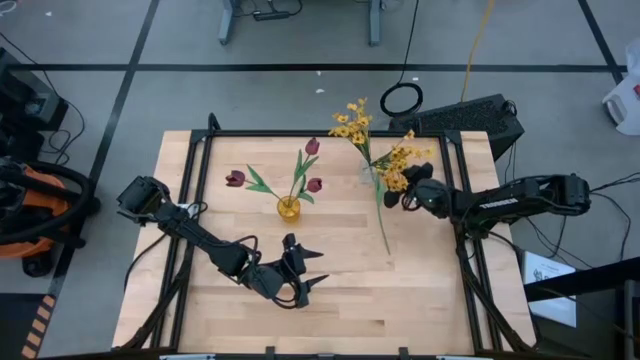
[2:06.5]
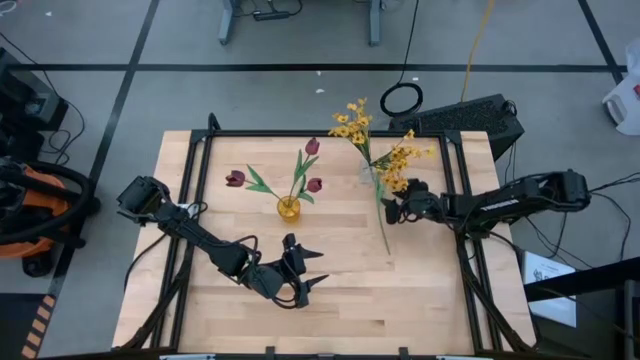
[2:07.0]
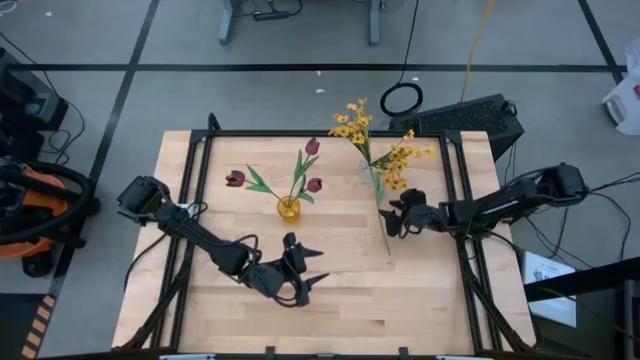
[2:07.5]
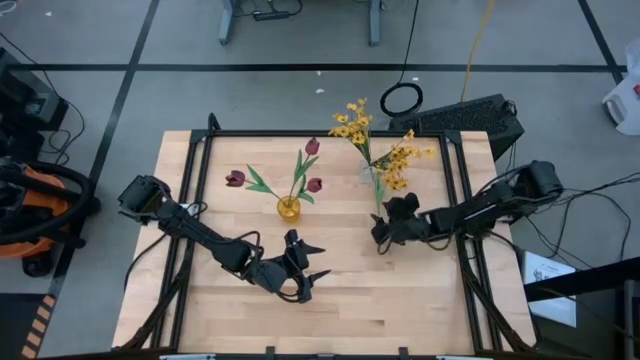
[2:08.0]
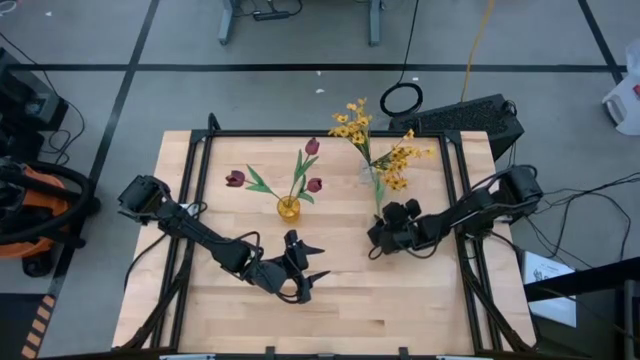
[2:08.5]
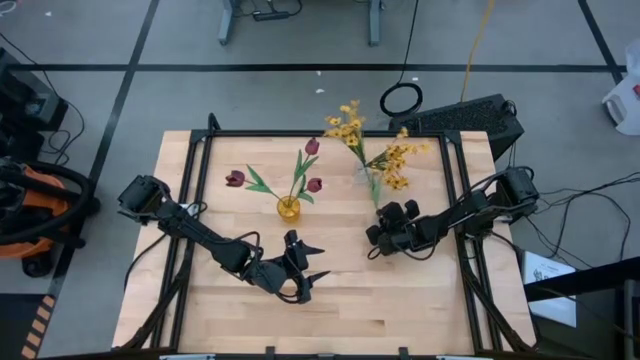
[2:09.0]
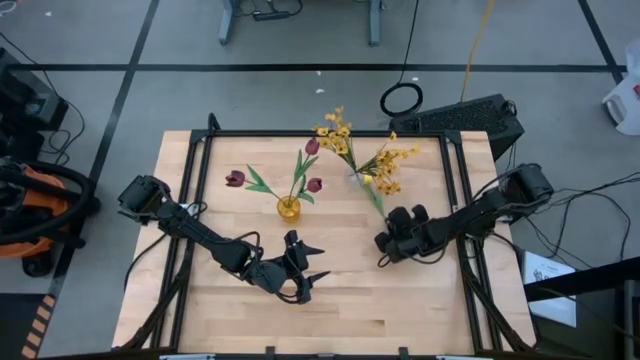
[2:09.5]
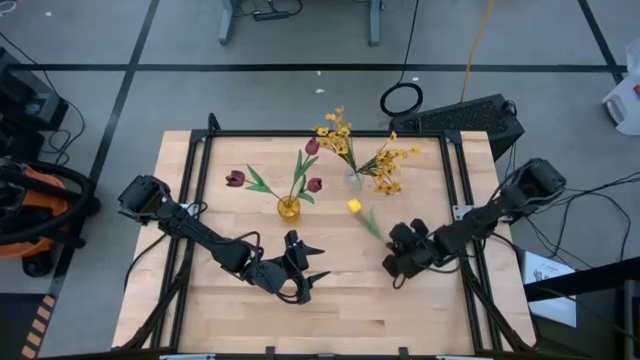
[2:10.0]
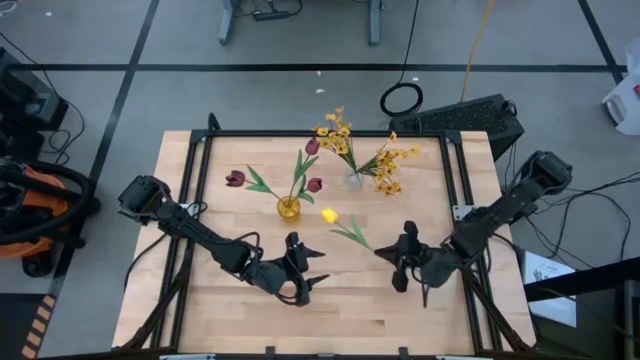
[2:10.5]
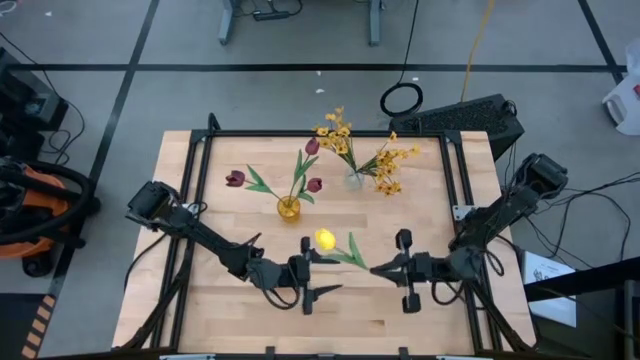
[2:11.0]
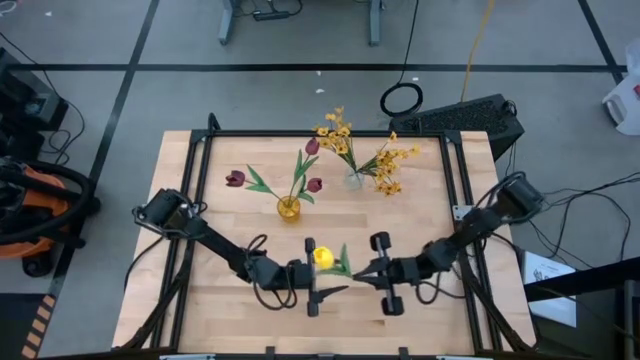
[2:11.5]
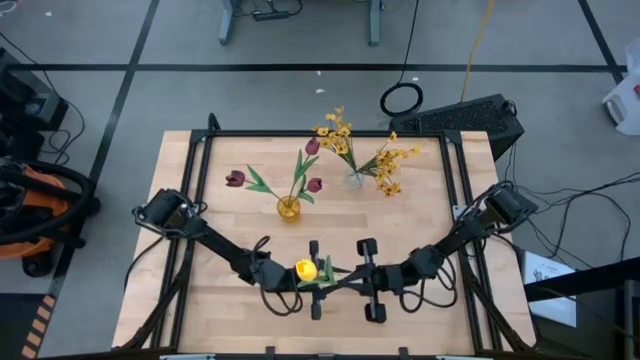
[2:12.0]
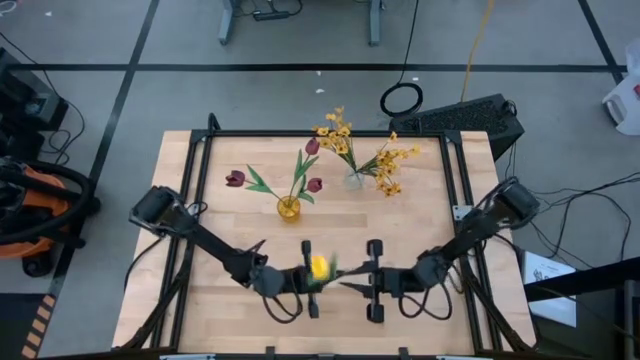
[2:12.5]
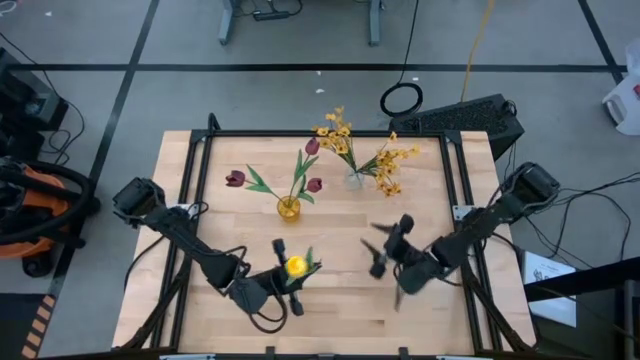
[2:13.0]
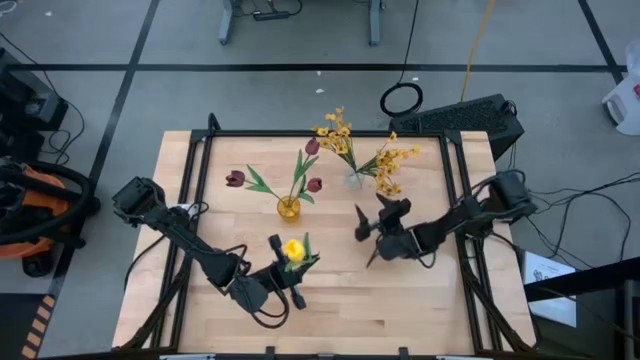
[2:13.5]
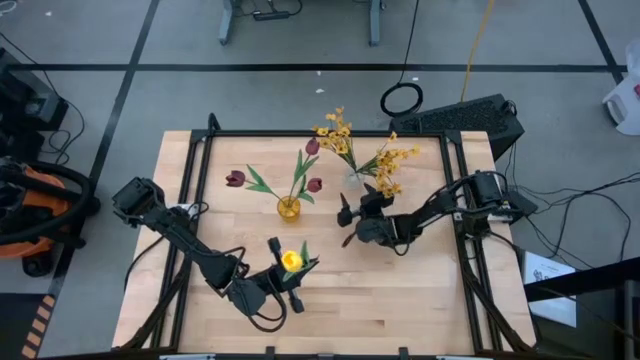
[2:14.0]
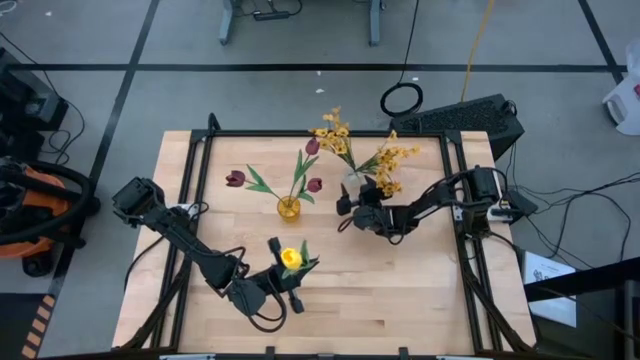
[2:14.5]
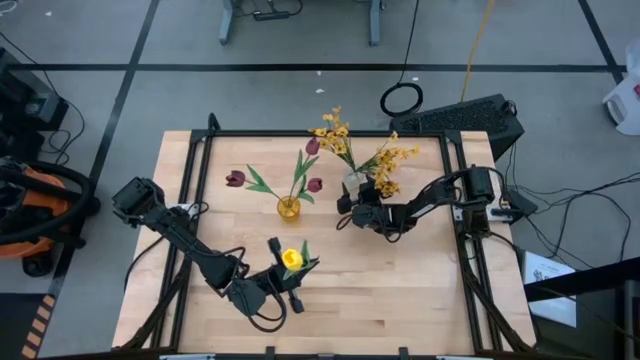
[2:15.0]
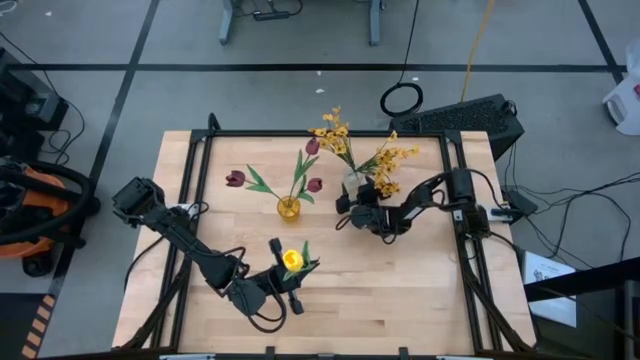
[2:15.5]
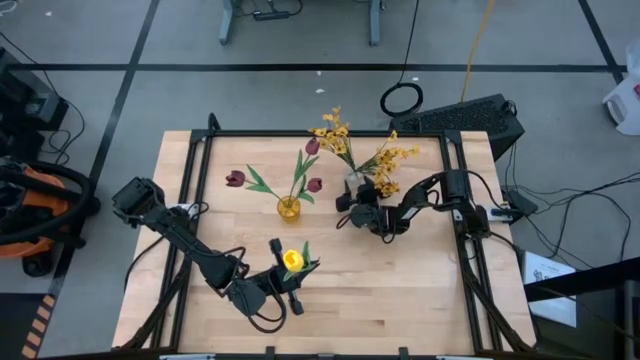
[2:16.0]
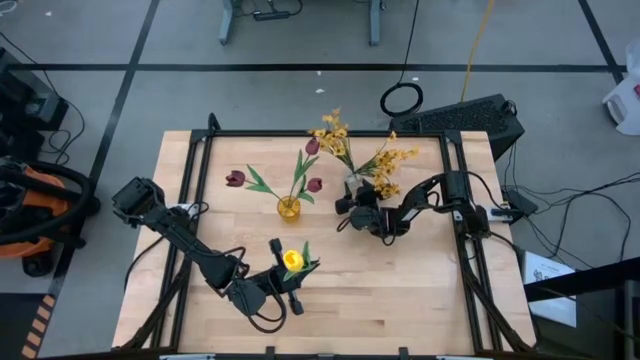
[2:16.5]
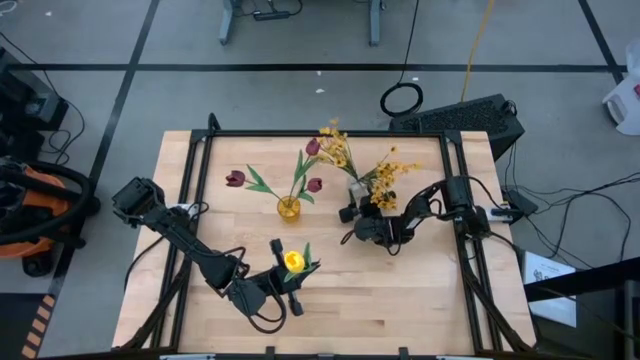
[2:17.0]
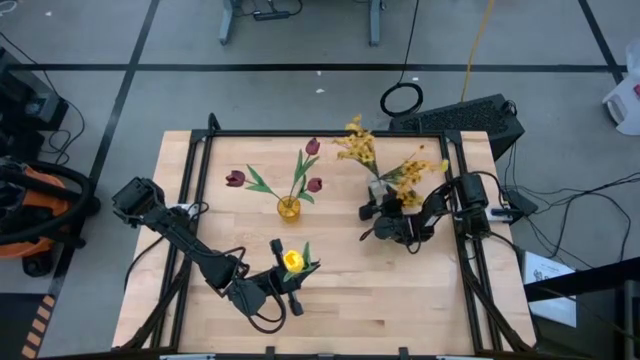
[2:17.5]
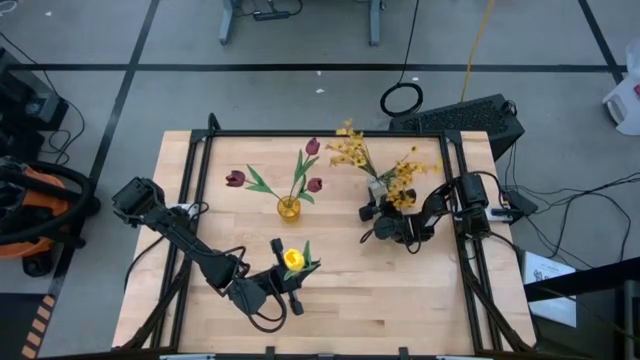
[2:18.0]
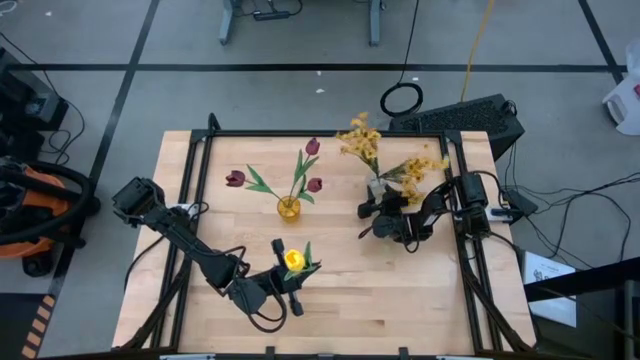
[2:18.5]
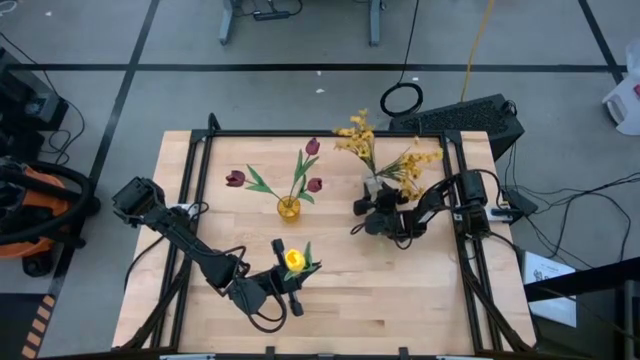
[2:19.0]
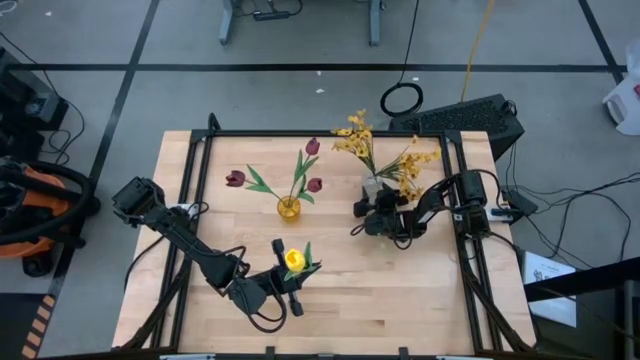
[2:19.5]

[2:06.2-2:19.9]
Task: Sort flowers into vase by color
Adjust the transparent vase

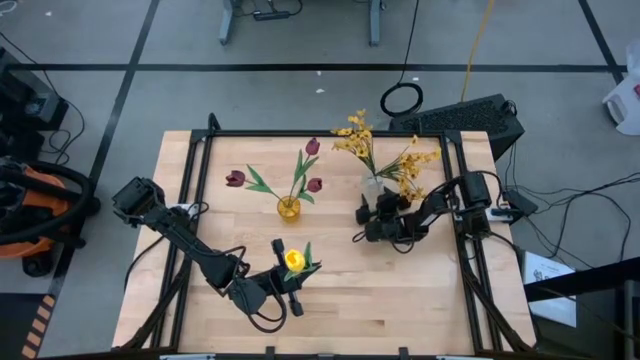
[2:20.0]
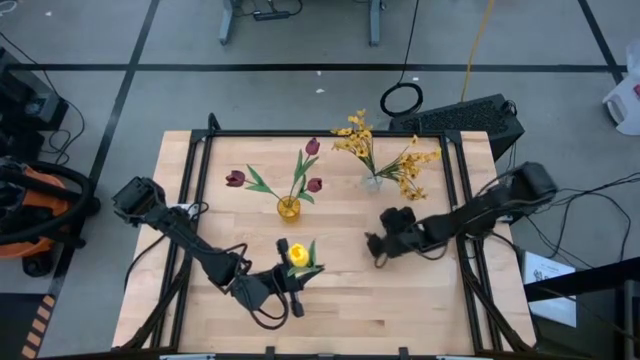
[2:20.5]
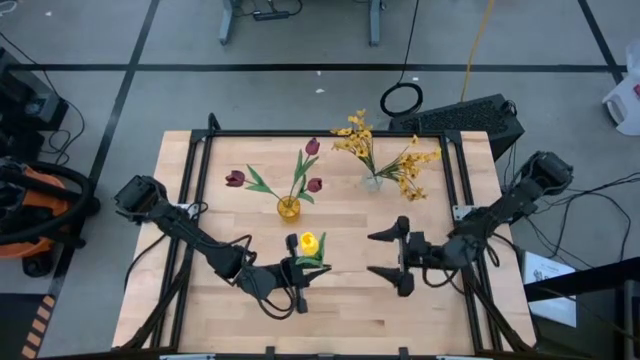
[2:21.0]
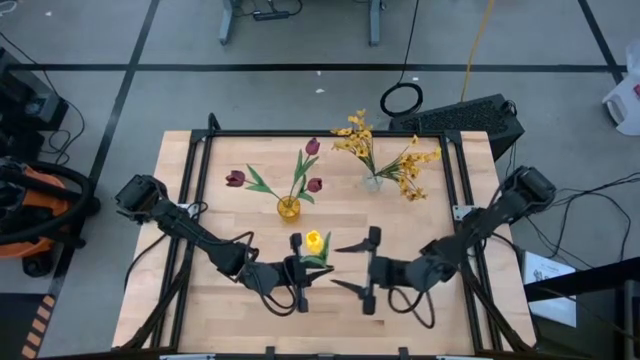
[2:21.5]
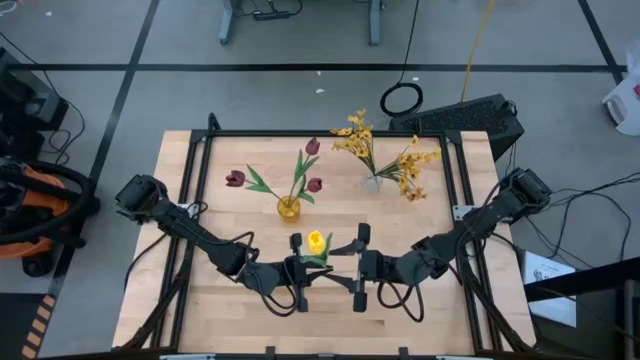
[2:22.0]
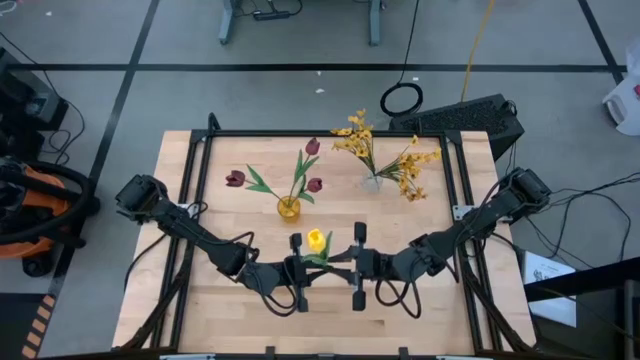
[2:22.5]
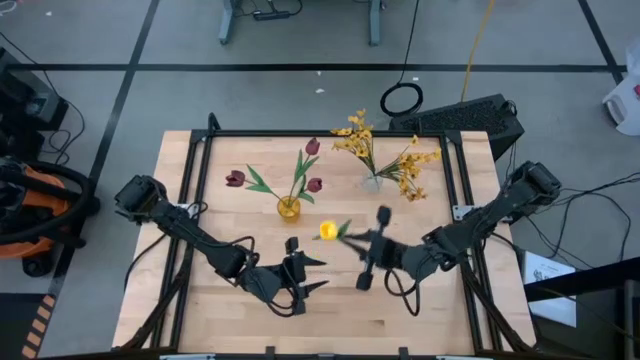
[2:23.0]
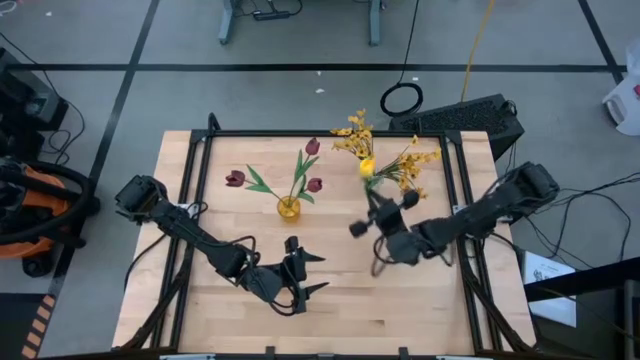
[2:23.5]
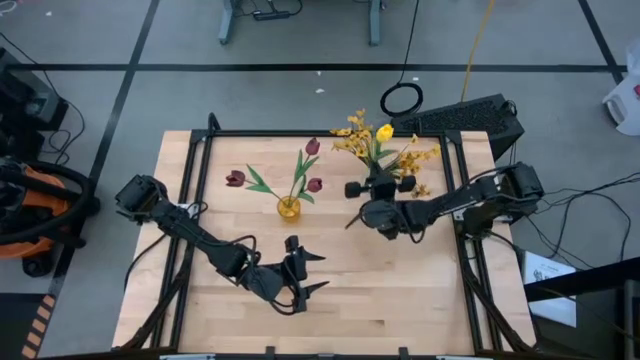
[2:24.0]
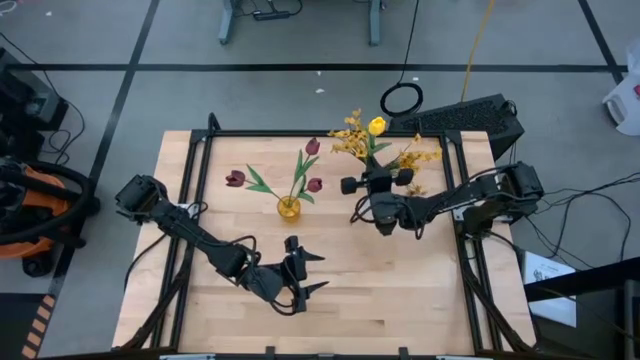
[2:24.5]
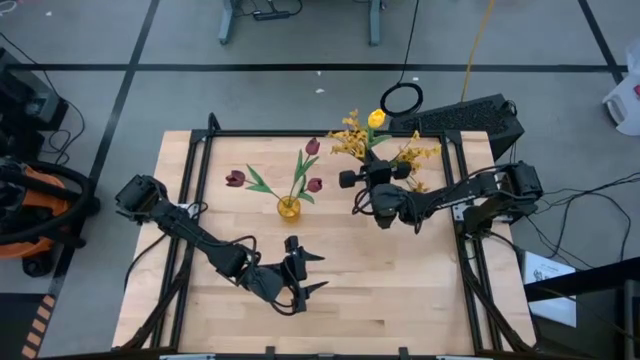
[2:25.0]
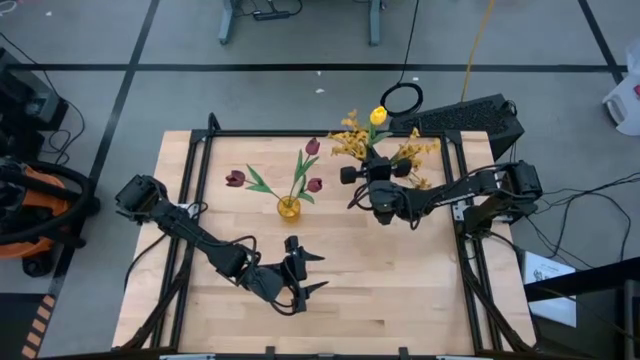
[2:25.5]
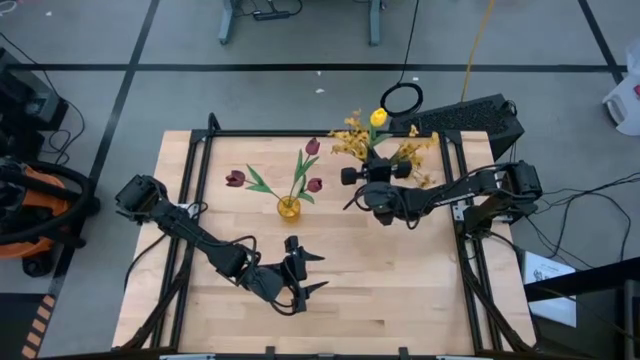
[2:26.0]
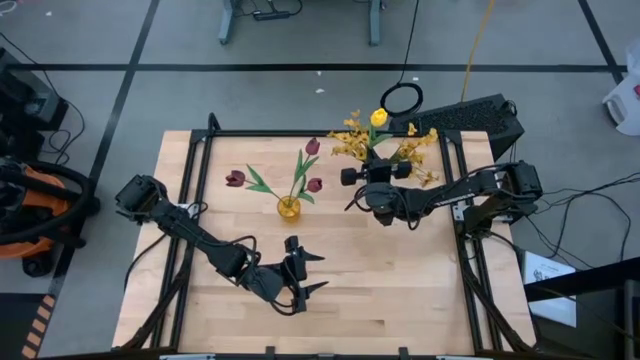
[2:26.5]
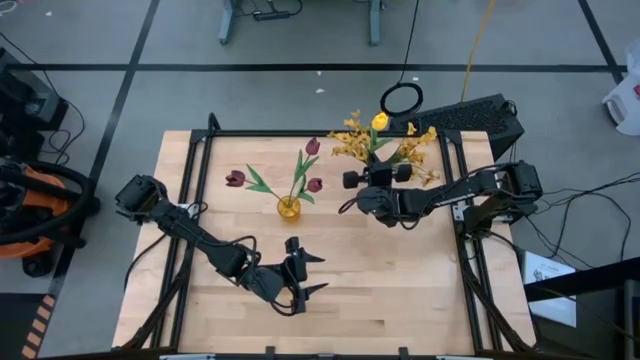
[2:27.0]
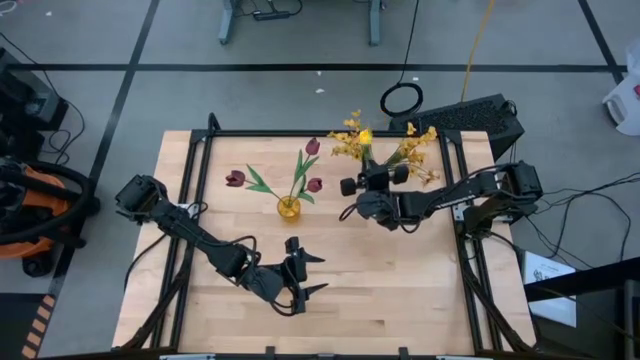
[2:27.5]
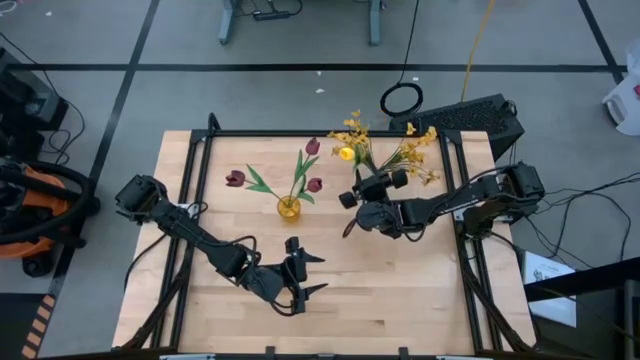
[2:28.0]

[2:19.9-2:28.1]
Put the yellow tulip into the transparent vase
